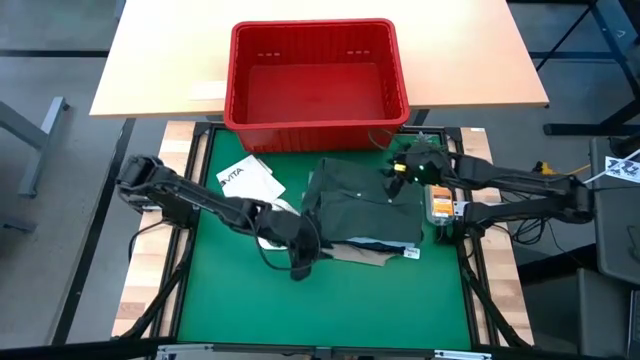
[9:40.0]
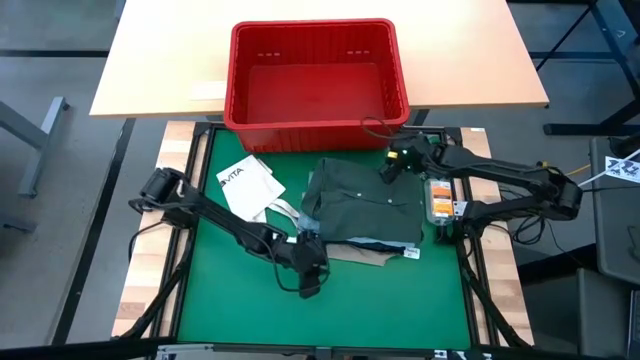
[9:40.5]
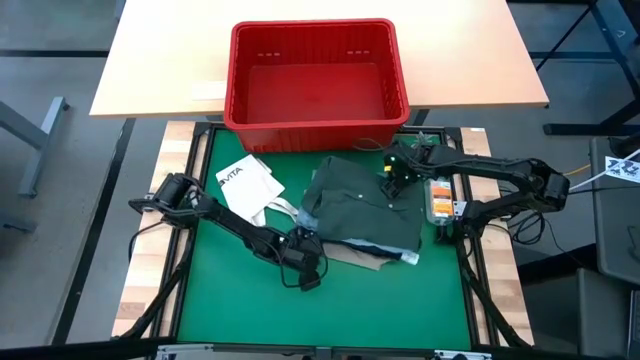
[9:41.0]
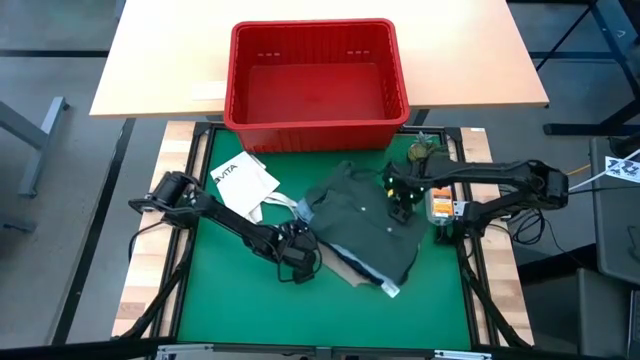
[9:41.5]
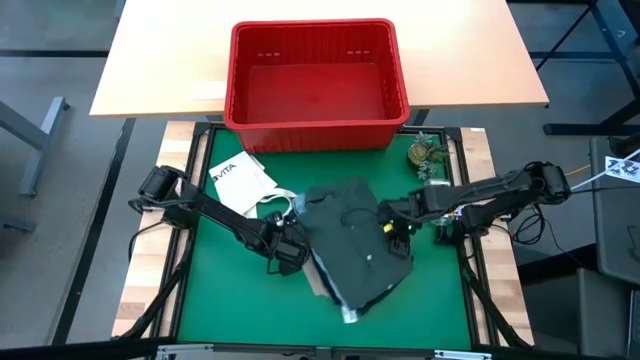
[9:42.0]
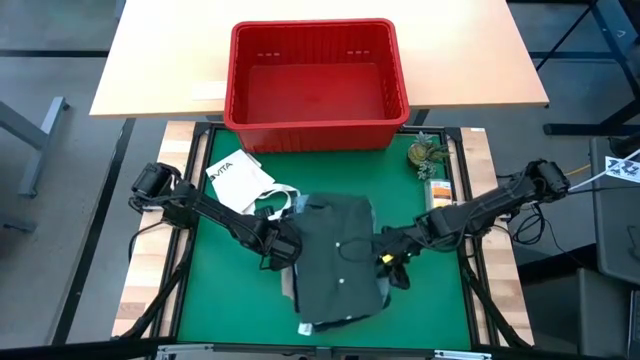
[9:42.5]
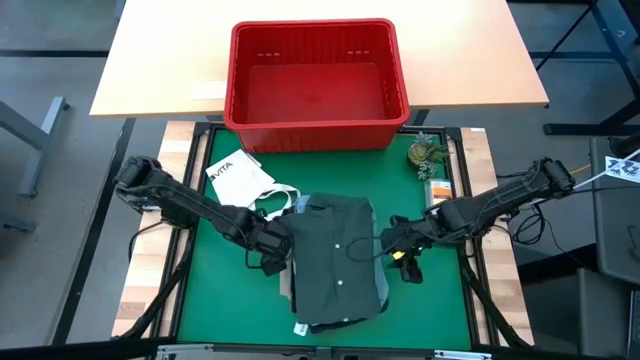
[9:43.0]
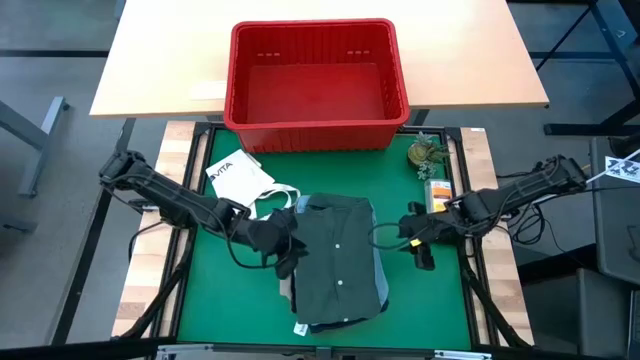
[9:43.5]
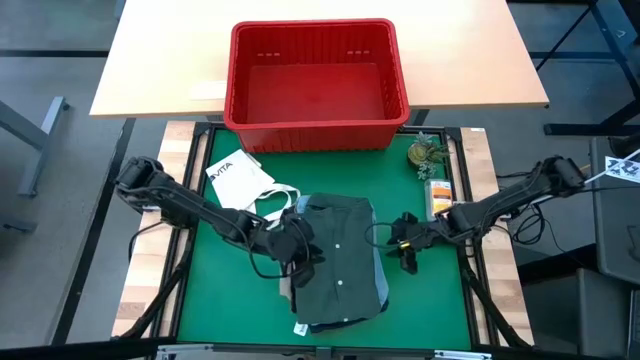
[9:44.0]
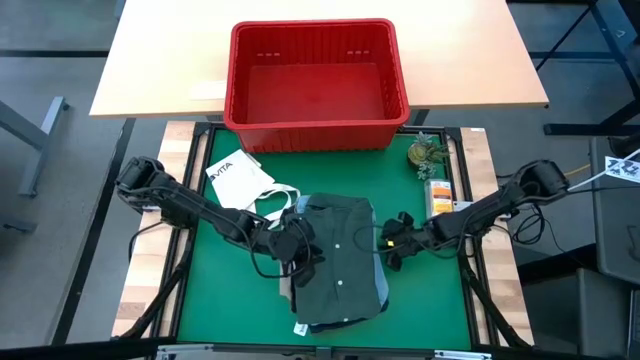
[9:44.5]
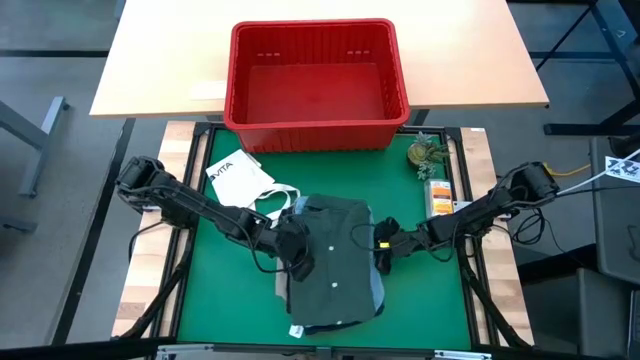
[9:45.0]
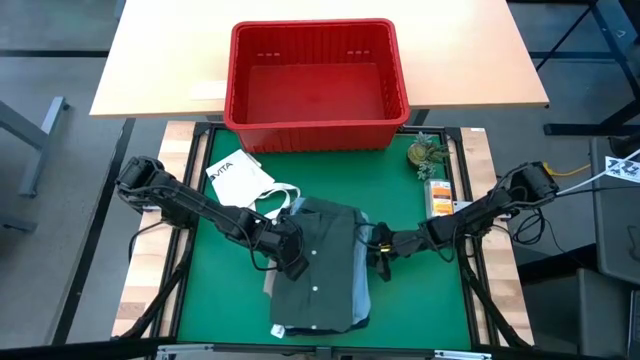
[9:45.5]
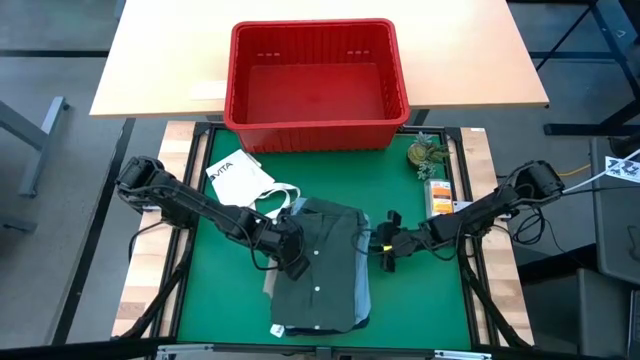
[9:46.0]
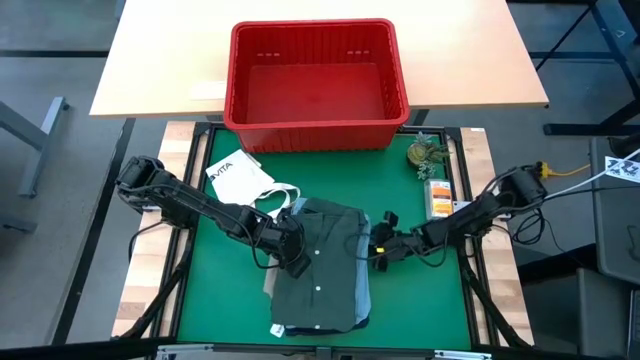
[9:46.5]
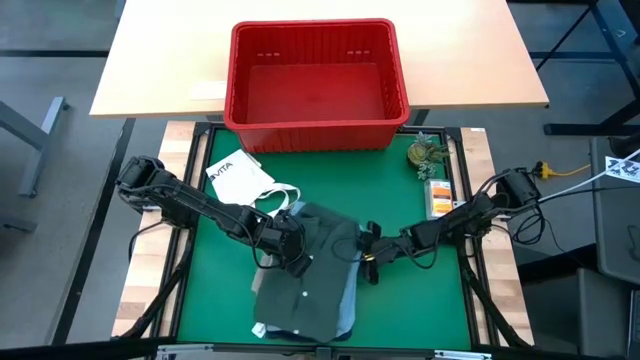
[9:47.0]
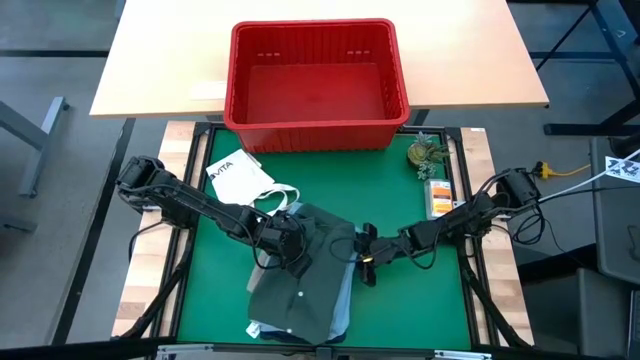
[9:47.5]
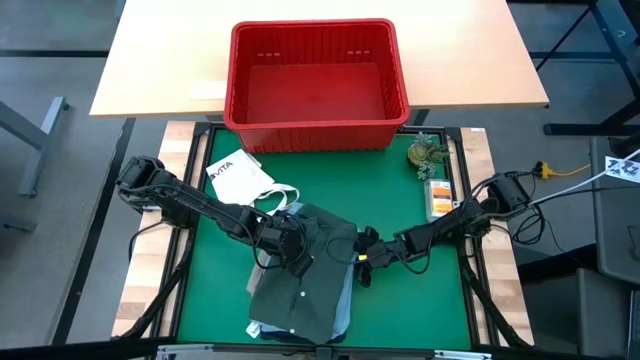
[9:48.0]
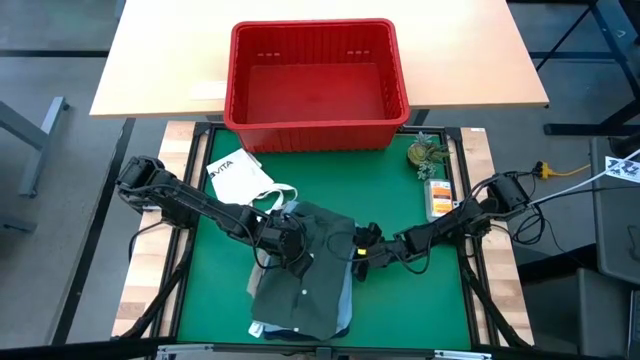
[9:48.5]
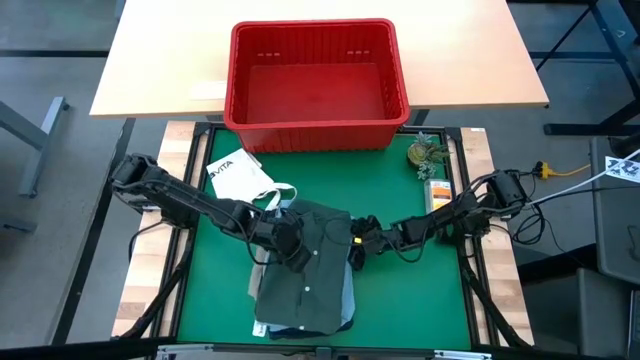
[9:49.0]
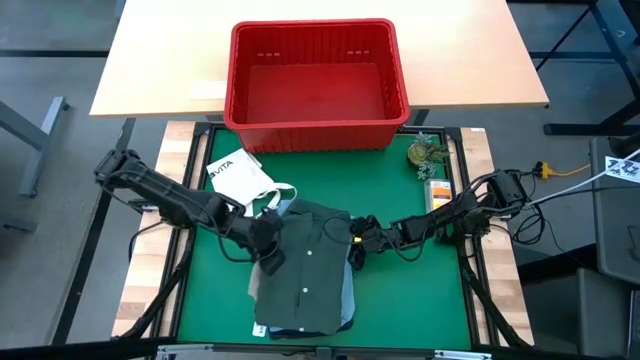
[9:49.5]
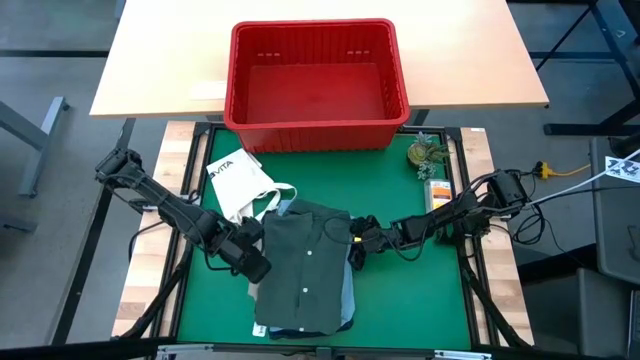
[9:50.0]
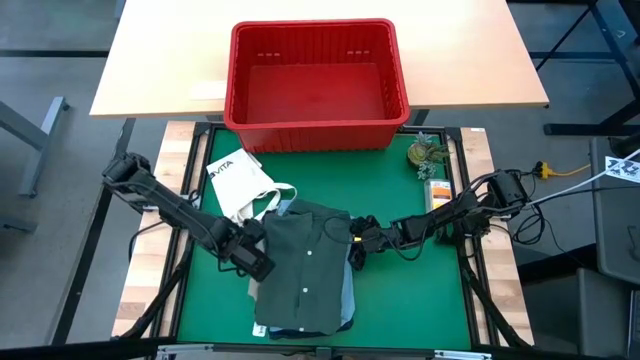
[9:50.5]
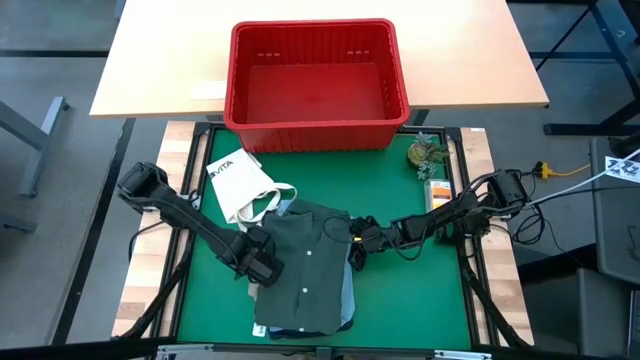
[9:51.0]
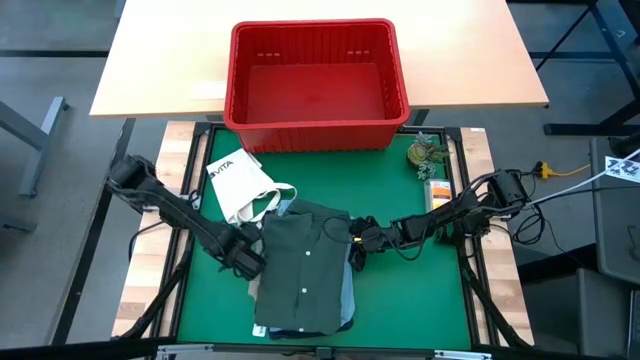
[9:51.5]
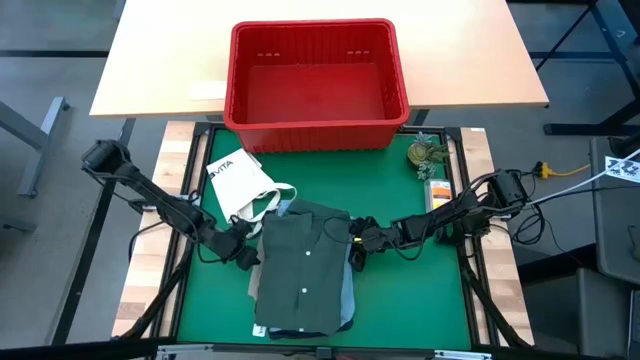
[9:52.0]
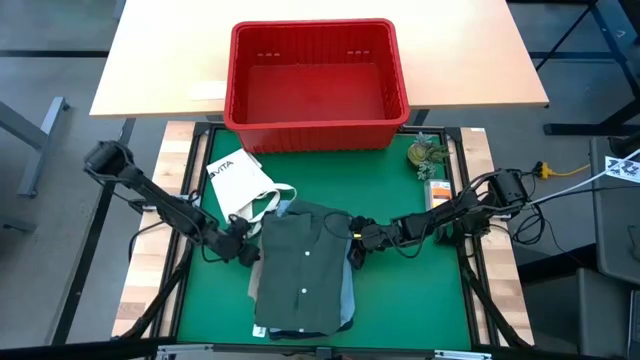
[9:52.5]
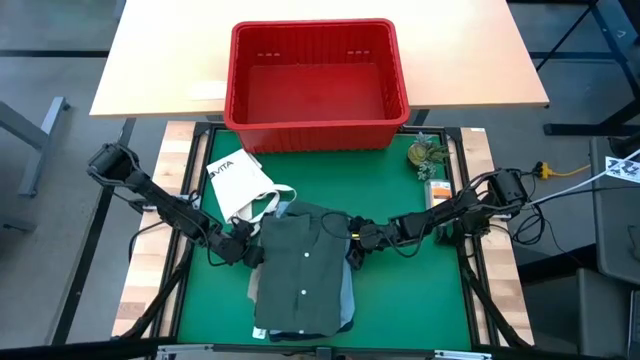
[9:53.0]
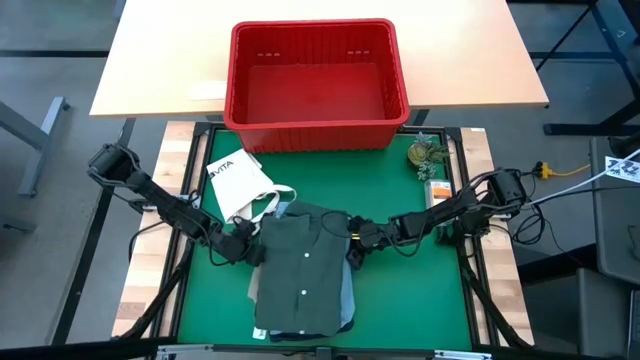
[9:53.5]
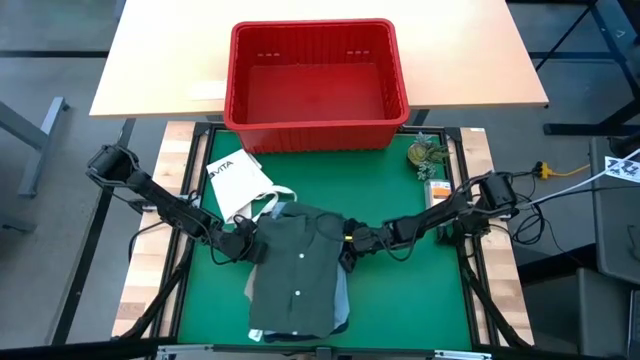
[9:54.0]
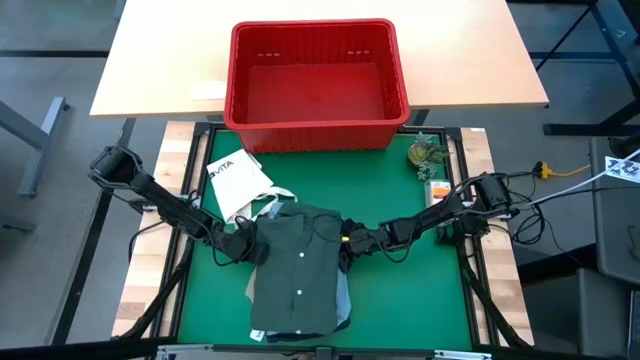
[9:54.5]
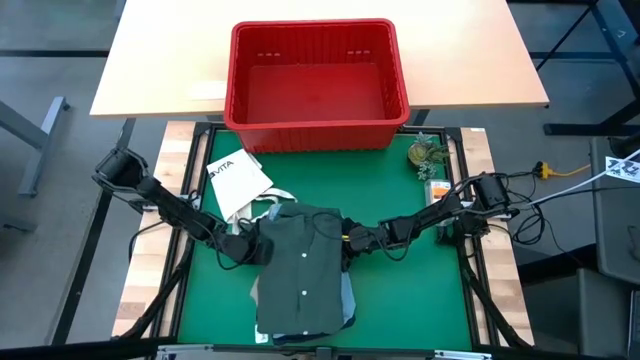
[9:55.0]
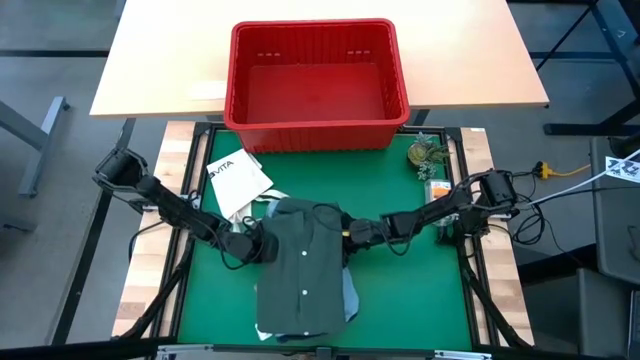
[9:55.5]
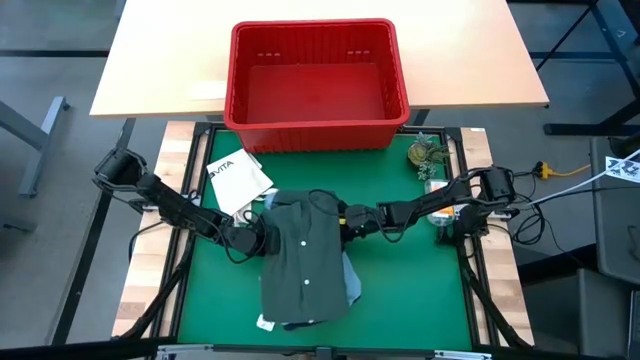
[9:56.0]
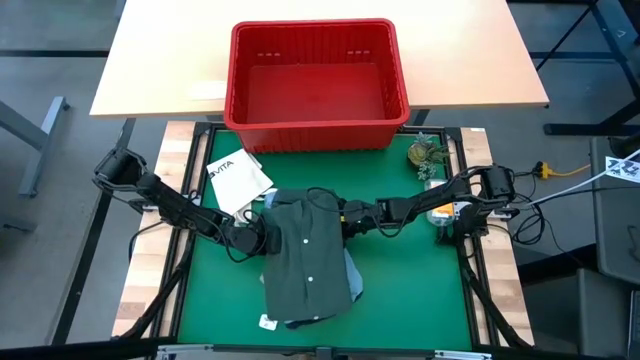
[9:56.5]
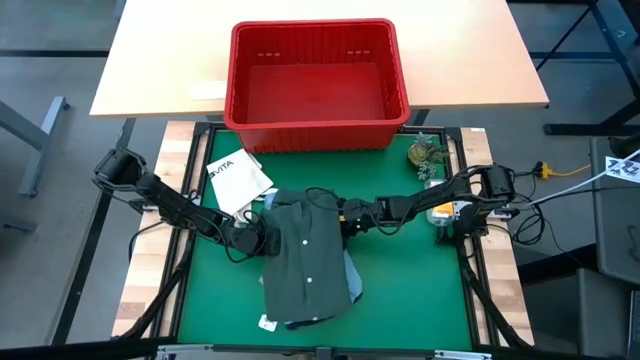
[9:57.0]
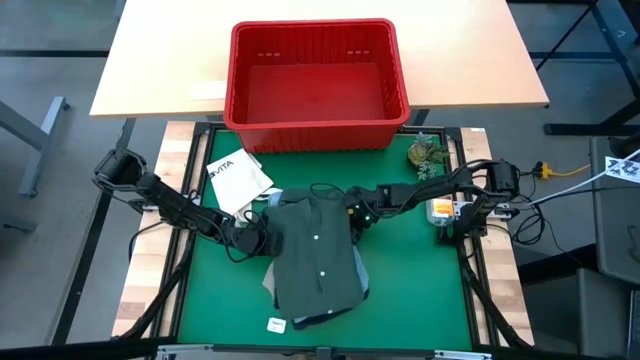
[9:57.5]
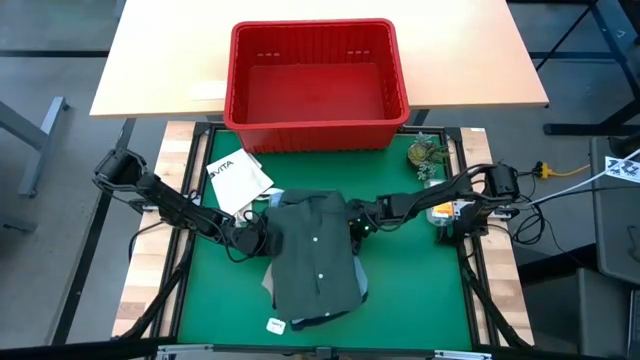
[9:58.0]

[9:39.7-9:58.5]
Task: Fold Laundry from Bin
Put the stacked clothing into the organizer bin

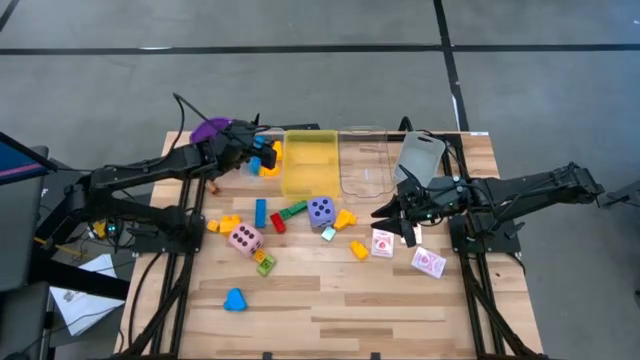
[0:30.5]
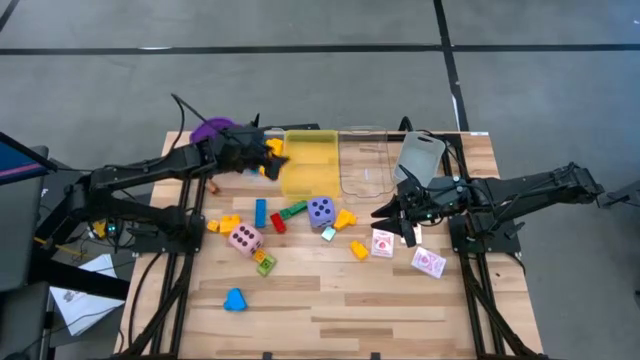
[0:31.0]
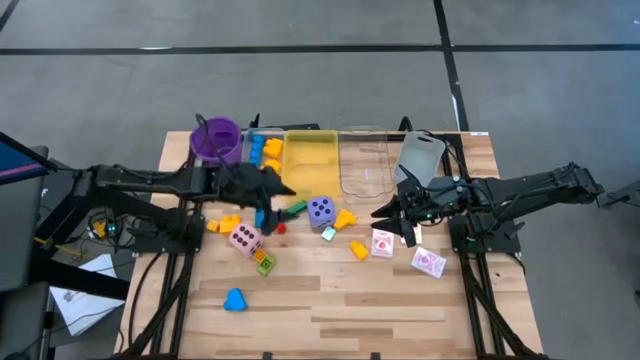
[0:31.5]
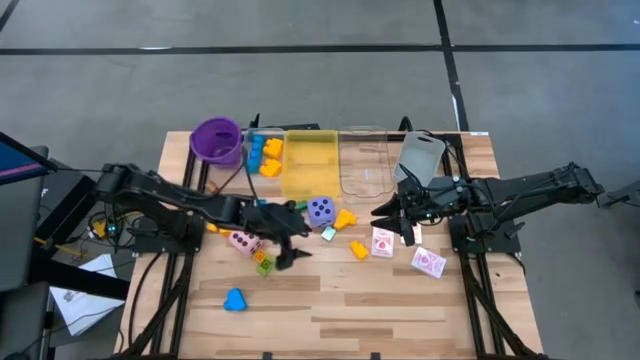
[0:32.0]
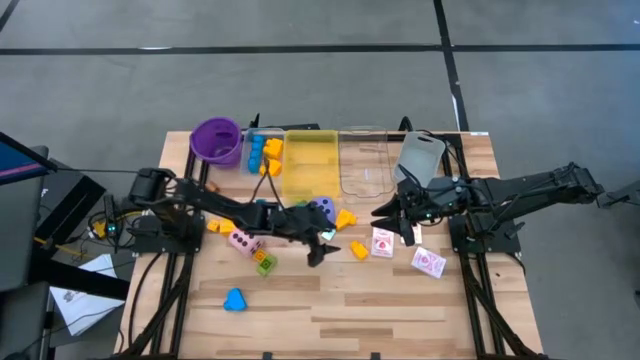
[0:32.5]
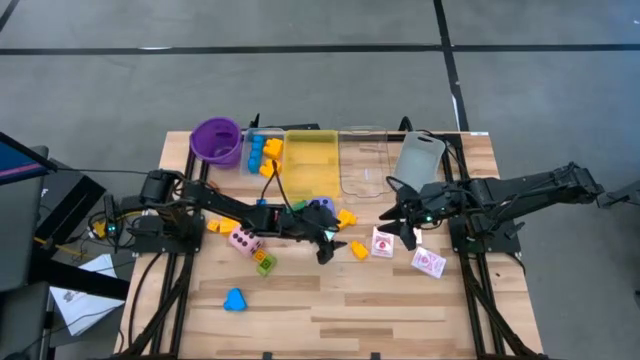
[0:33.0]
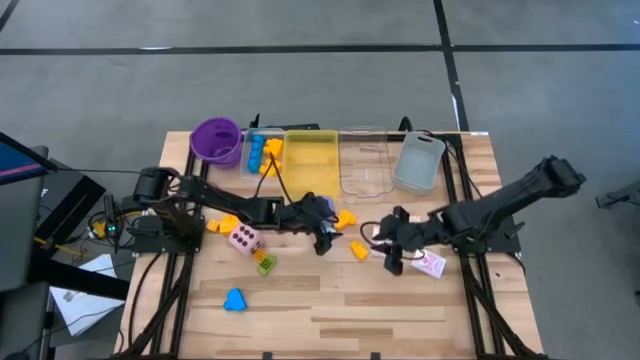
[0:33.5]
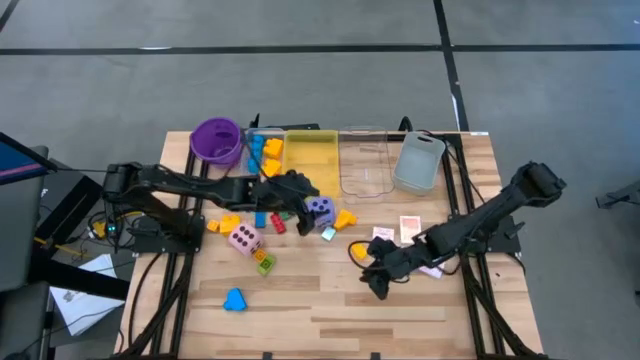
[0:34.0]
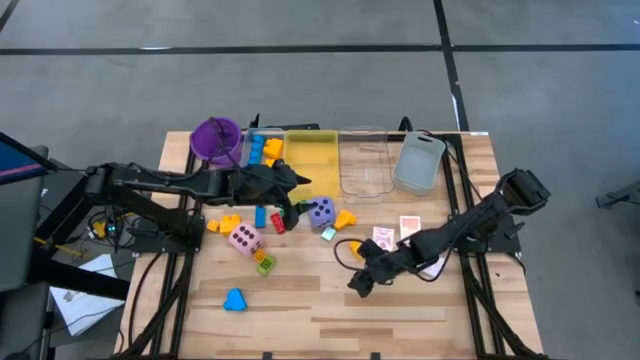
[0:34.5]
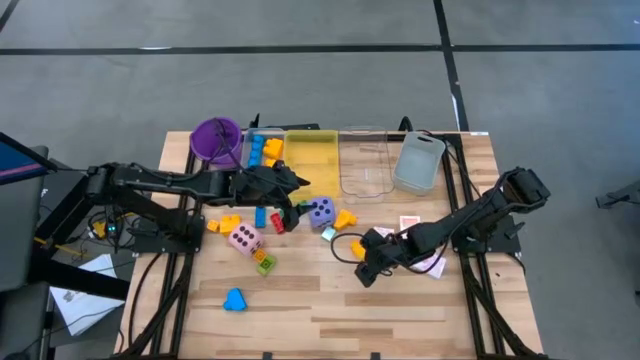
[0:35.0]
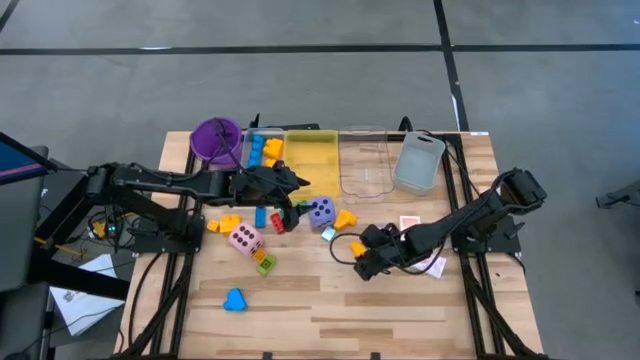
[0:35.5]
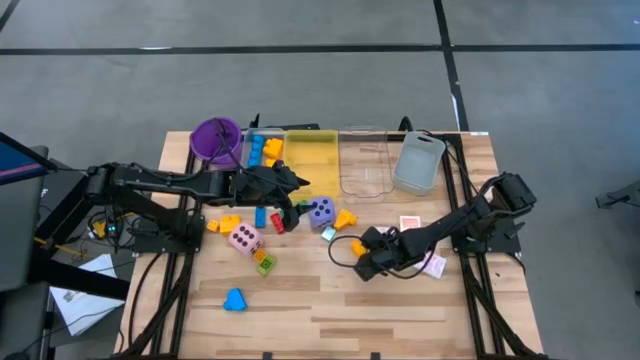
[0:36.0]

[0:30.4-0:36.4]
Task: Pick & Place Toys
Put the right yellow stud game piece into the left transparent bin
